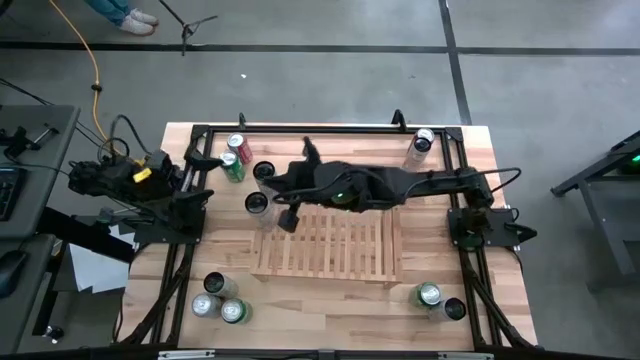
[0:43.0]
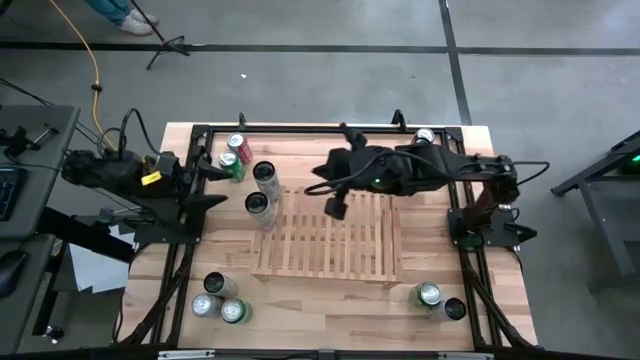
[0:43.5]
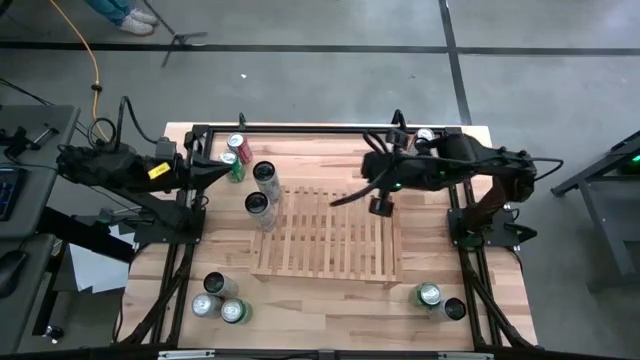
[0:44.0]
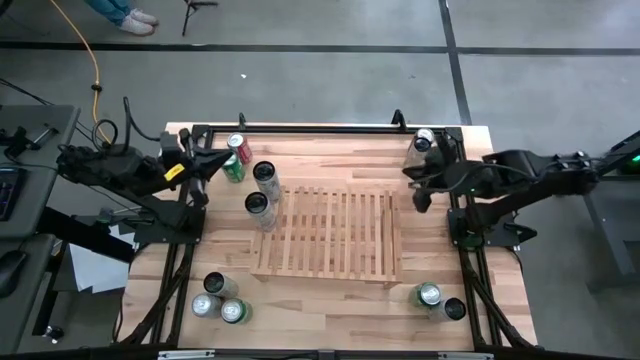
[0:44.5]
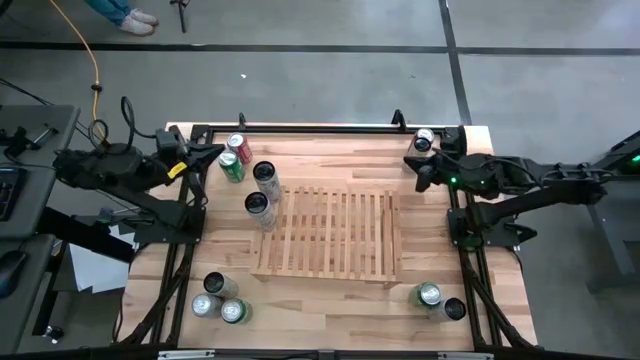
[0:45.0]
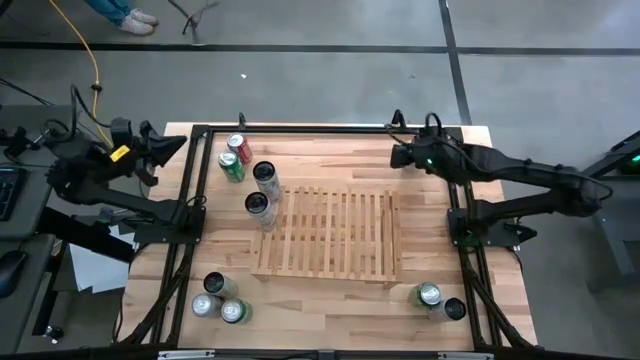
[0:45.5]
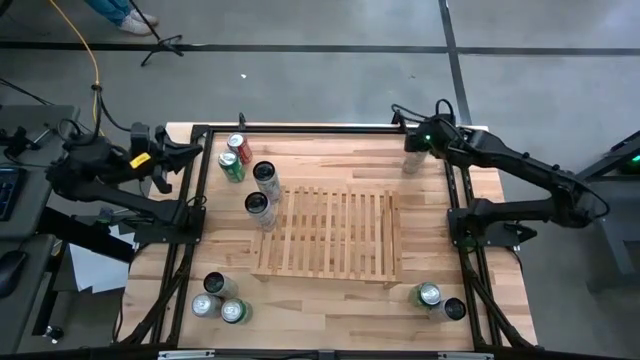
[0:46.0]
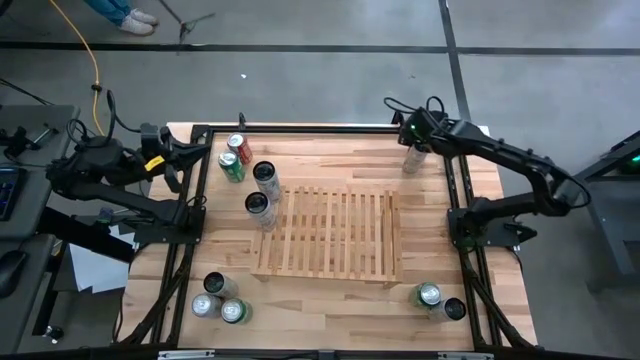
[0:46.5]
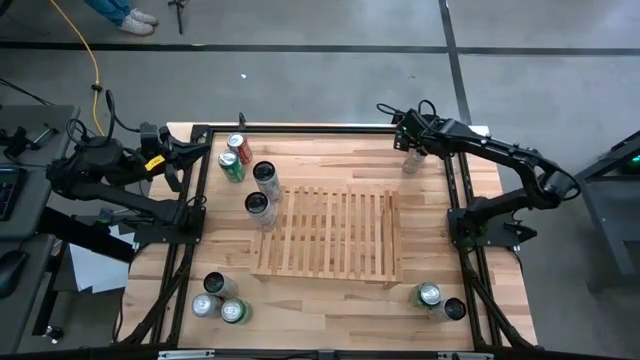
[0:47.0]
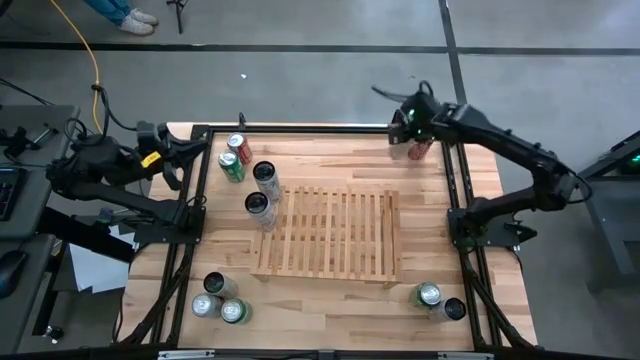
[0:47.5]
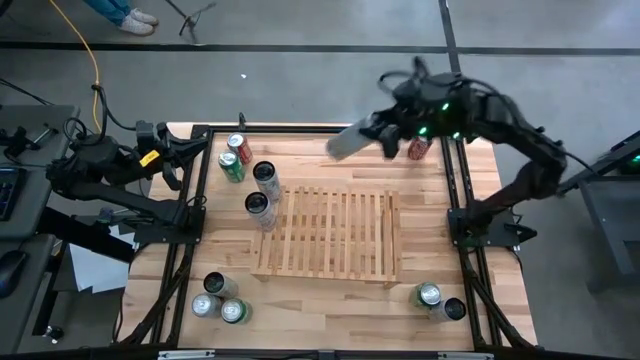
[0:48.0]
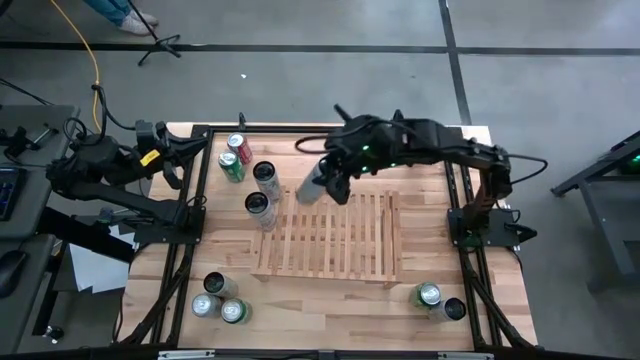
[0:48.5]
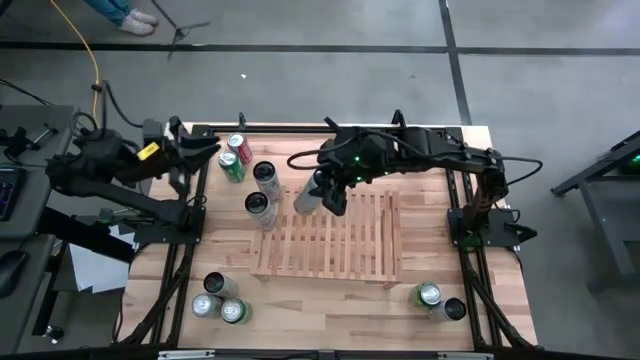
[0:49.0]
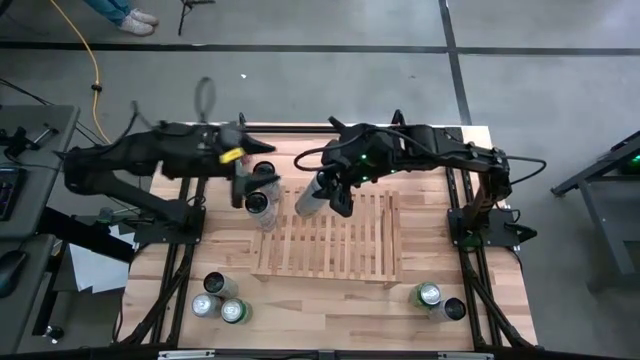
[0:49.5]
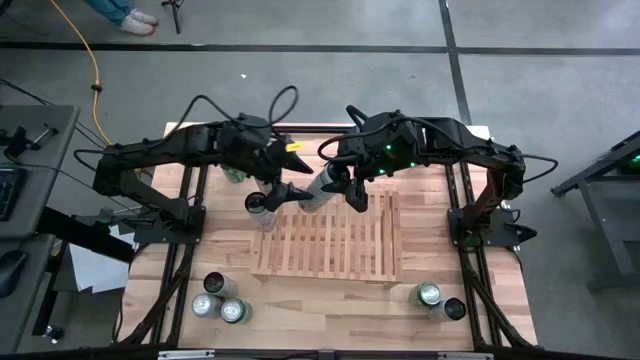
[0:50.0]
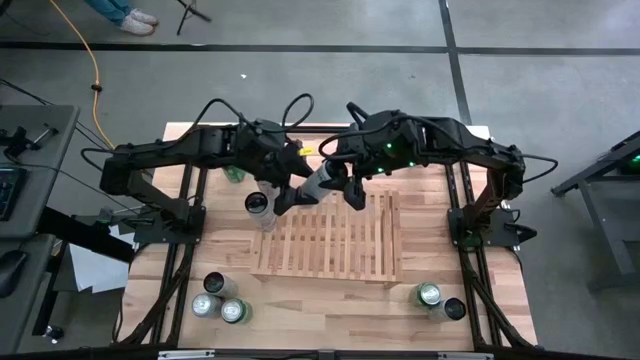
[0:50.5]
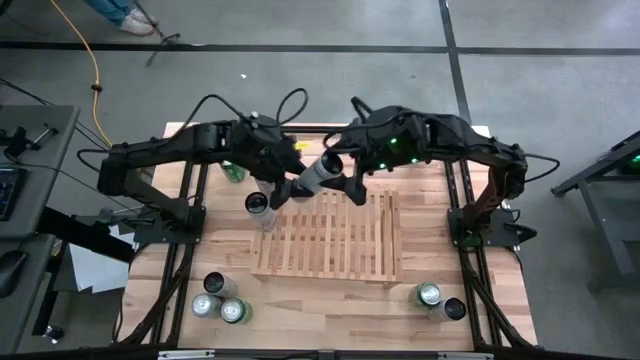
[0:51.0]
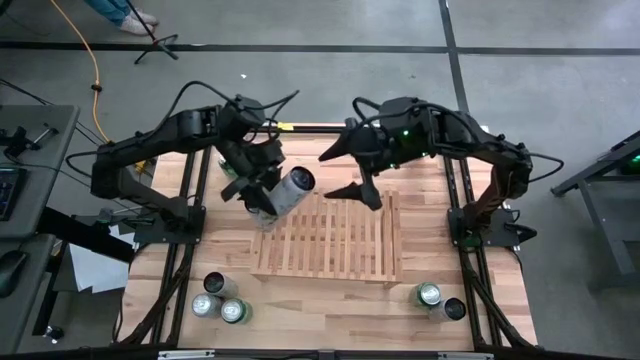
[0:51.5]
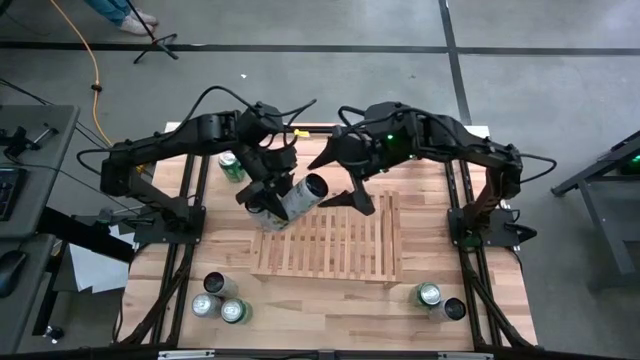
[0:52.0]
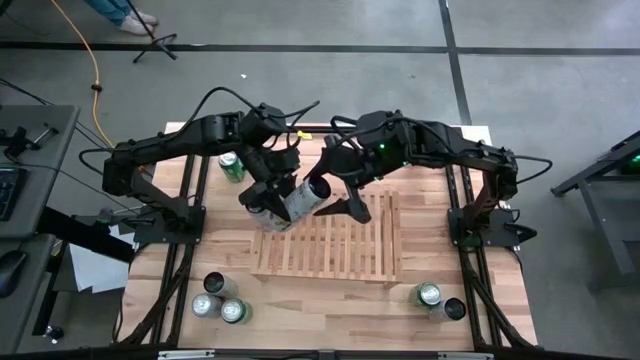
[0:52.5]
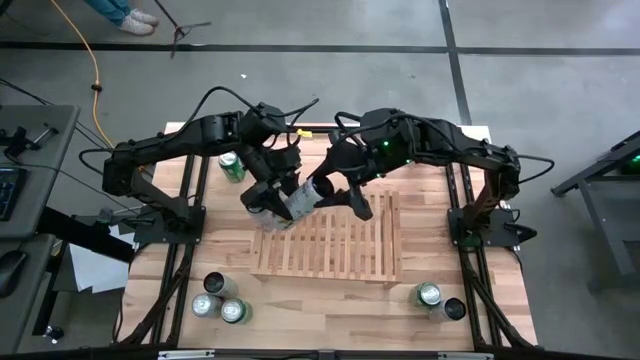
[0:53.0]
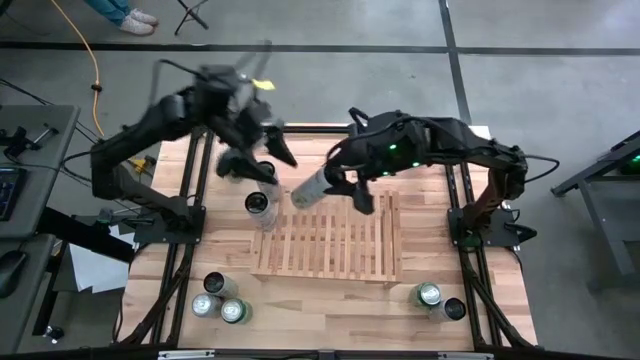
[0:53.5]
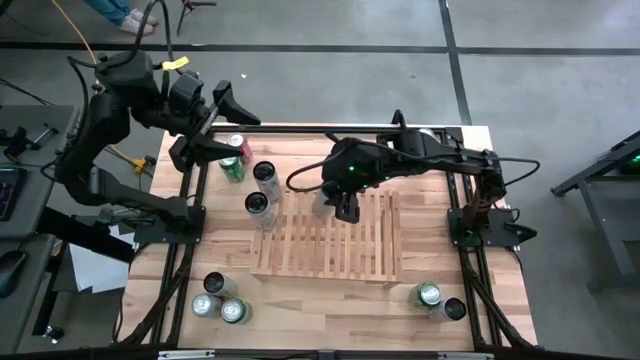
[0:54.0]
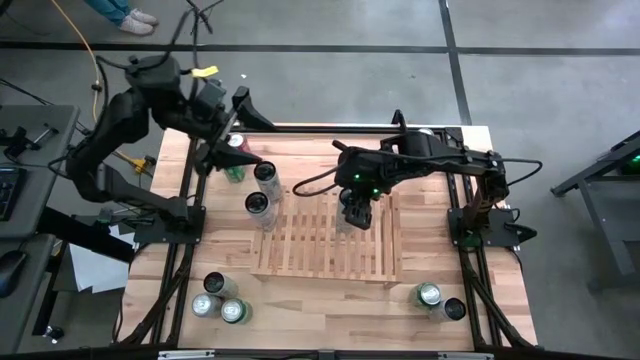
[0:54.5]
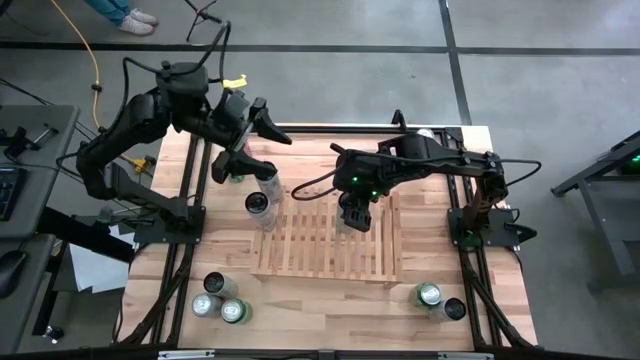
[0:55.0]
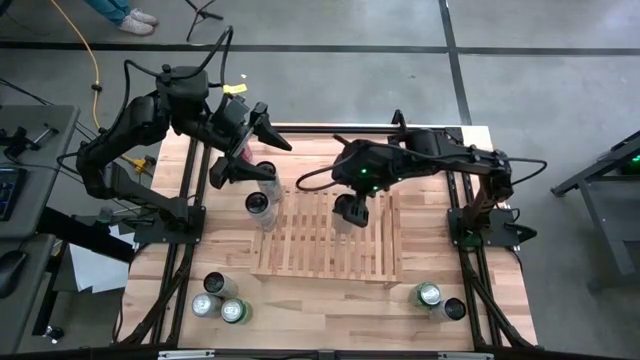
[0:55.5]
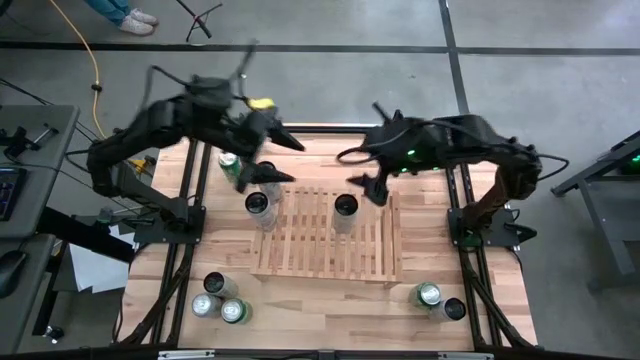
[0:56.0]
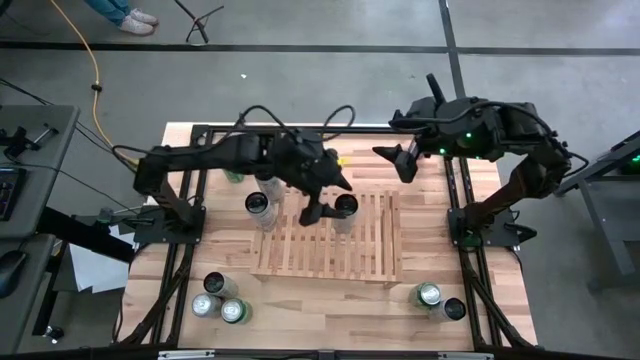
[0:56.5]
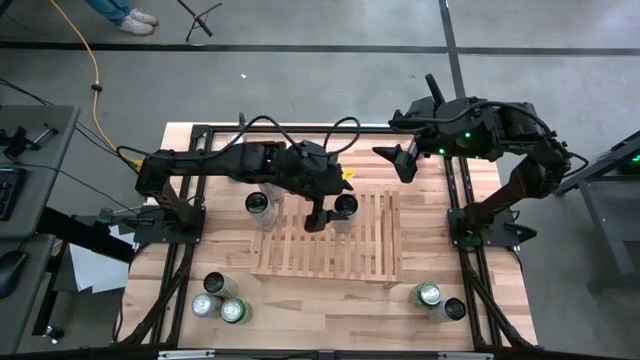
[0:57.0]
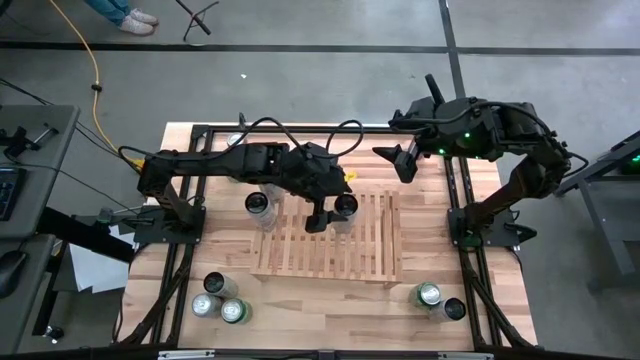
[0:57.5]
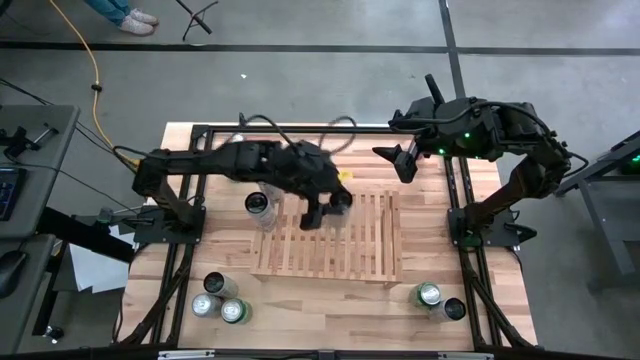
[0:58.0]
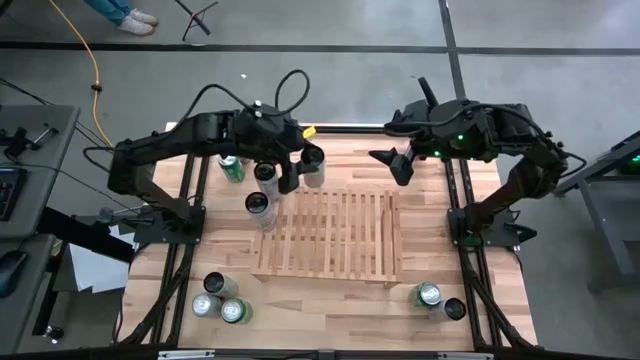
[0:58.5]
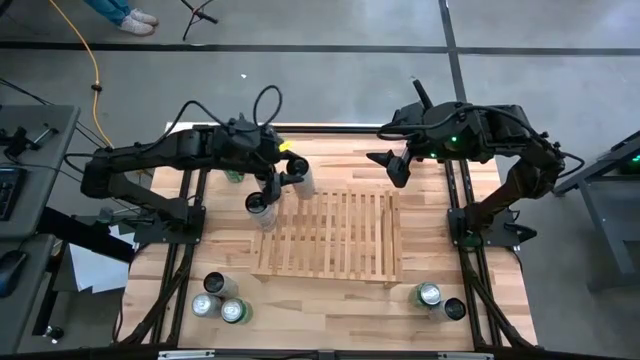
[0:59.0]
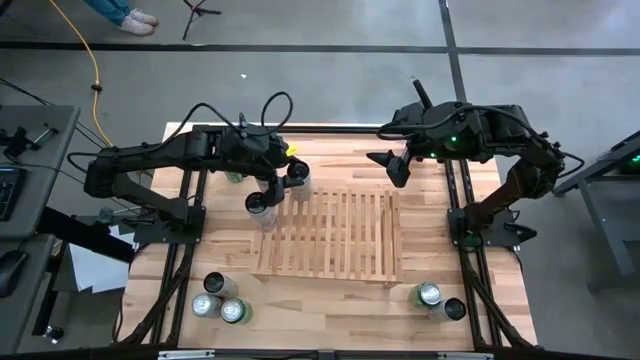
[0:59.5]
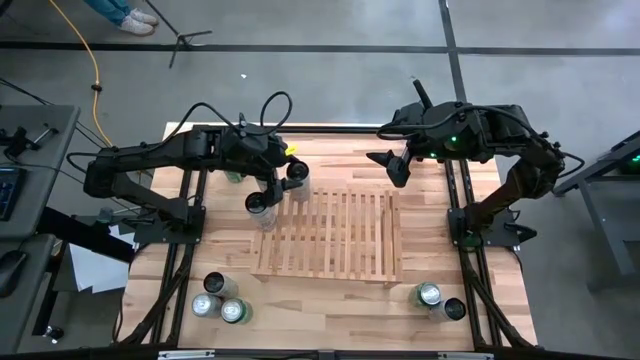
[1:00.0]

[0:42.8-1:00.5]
Task: Place canned beverage on shelf
Put the top right white yellow soda can on the shelf

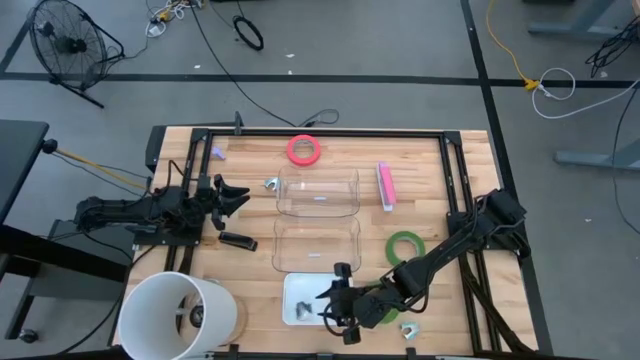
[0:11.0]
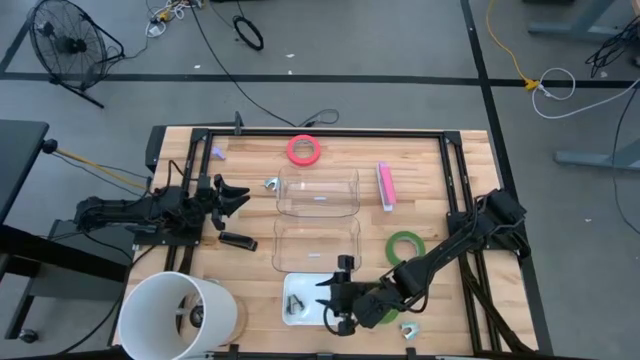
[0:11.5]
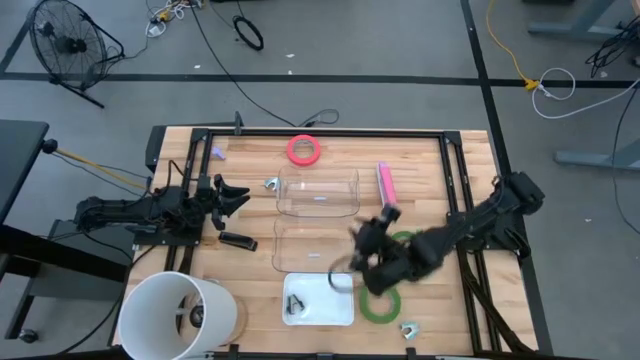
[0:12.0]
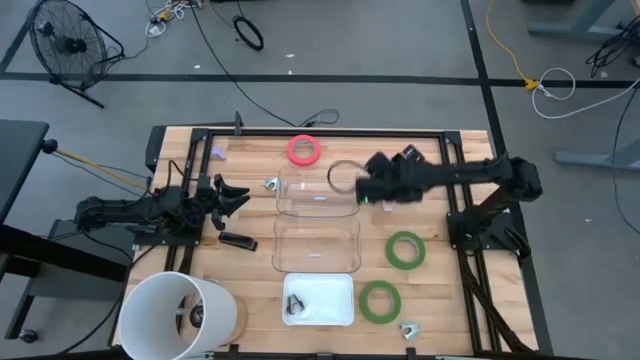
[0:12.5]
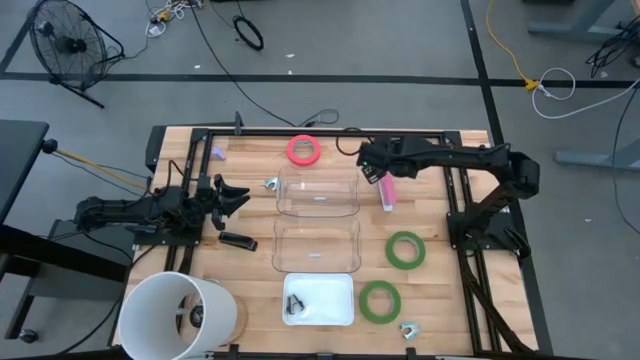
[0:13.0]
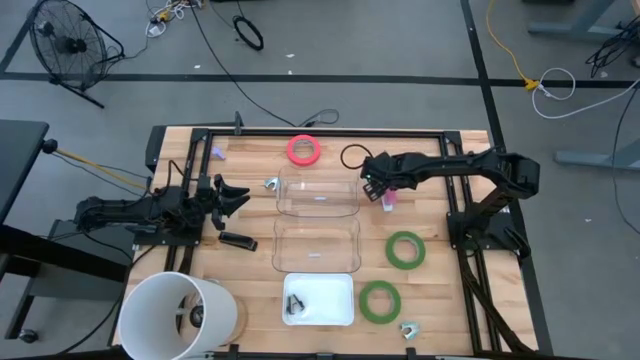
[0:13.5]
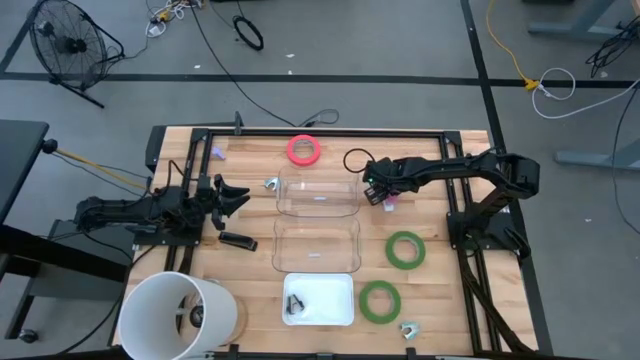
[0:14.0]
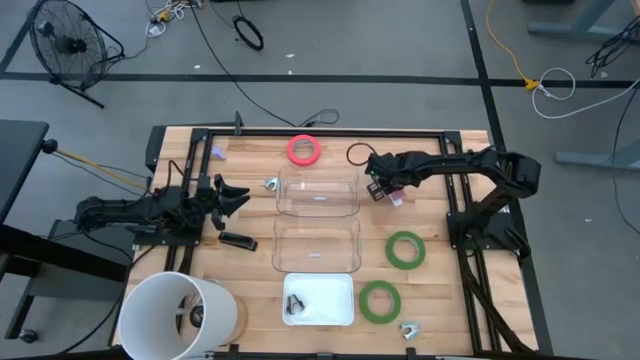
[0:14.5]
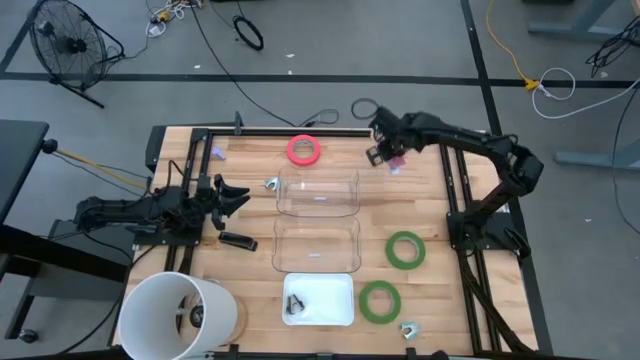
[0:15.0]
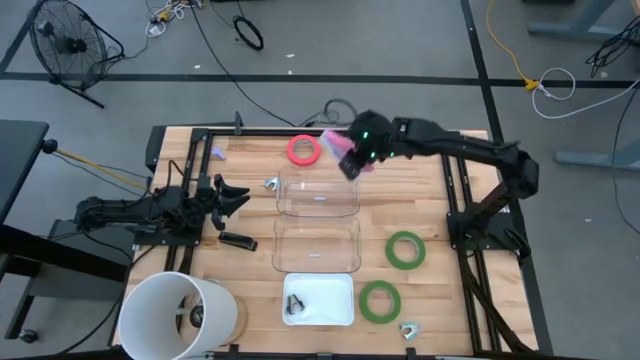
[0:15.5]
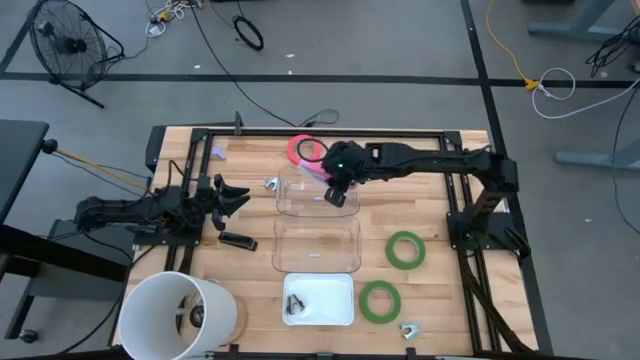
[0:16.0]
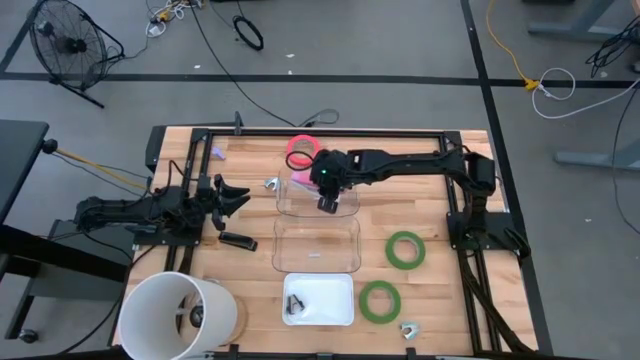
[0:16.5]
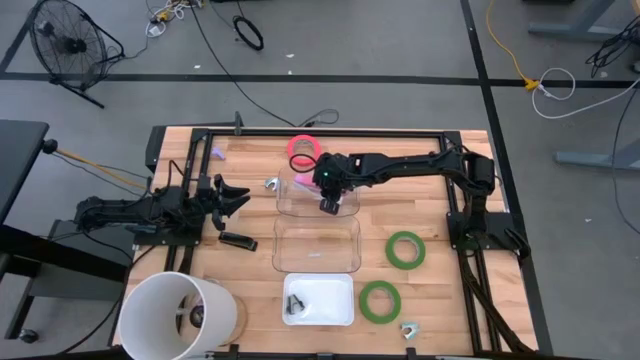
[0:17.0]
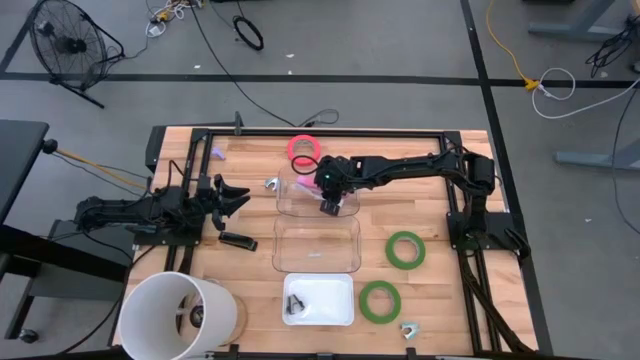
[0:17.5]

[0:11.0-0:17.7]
Task: Pick and place Stapler, Stapler remover, tape
Put the pink stapler into the top transparent bin
